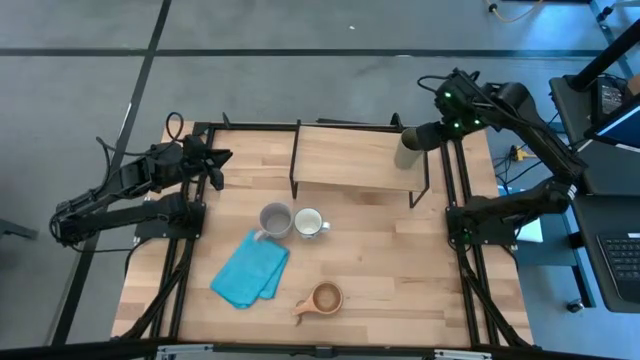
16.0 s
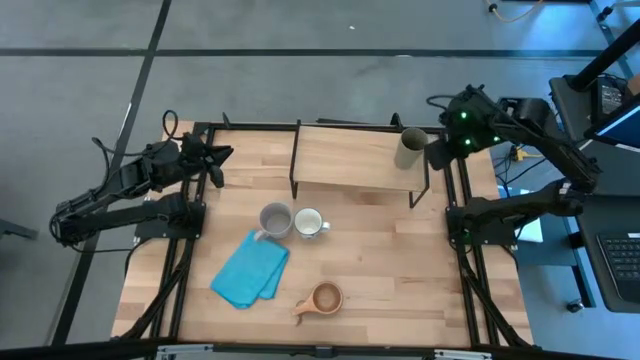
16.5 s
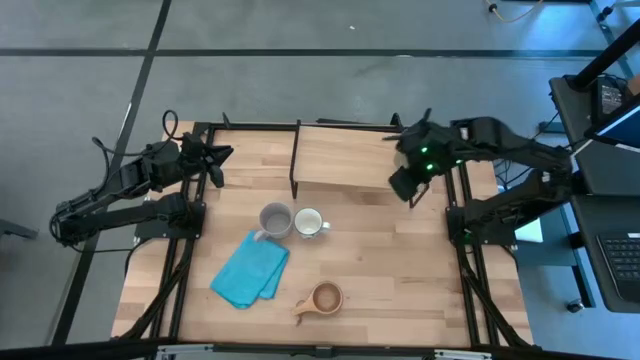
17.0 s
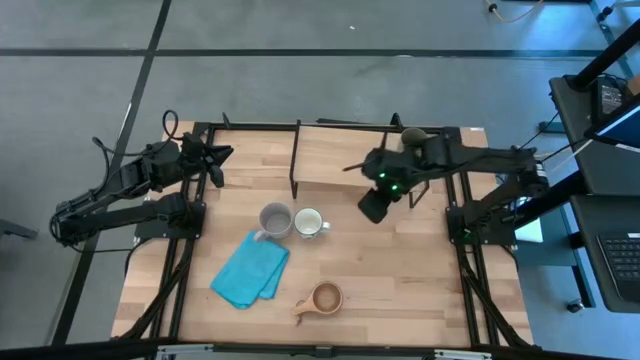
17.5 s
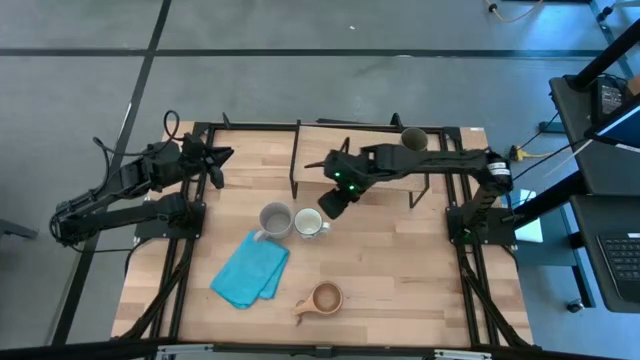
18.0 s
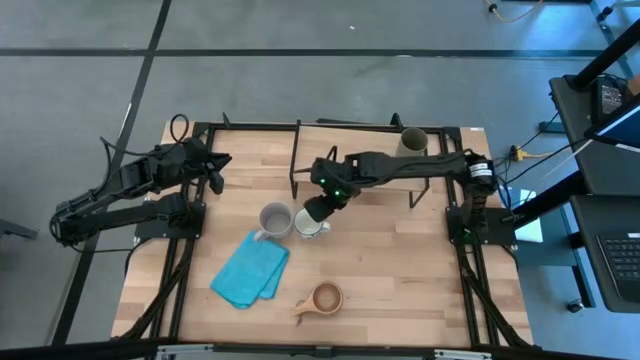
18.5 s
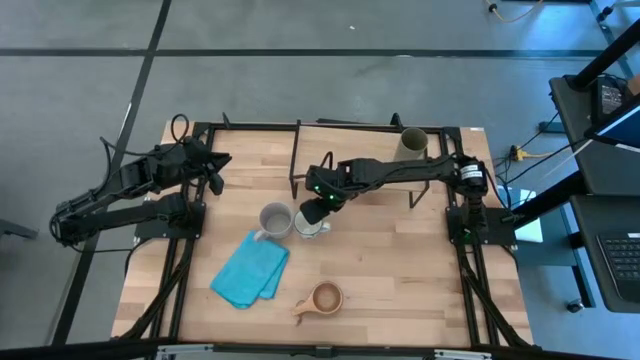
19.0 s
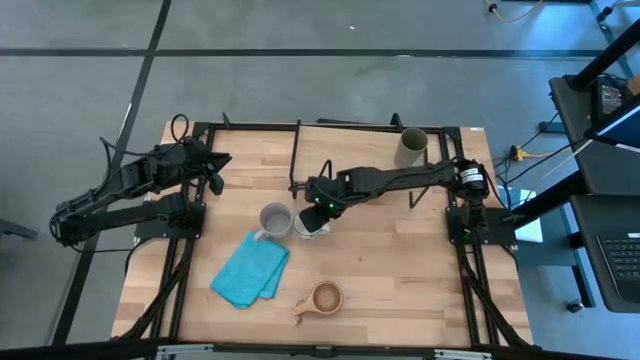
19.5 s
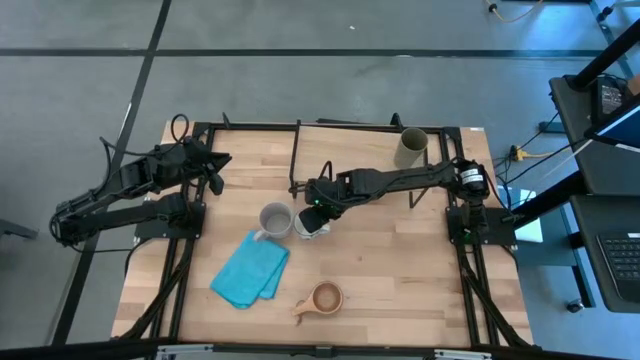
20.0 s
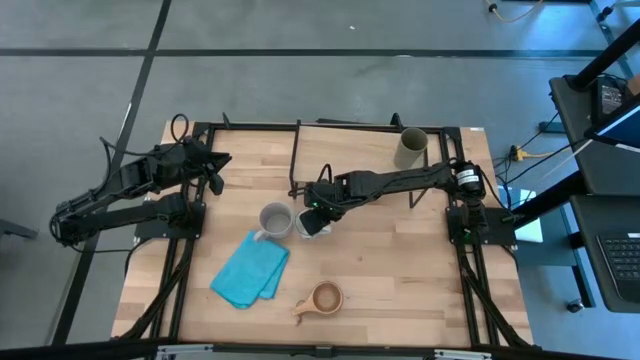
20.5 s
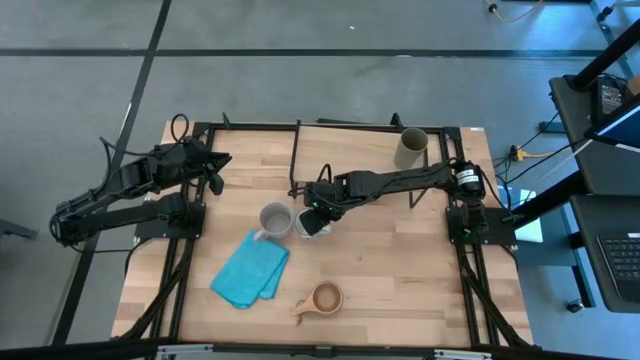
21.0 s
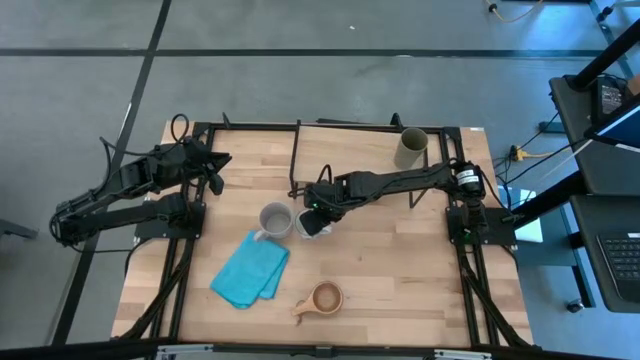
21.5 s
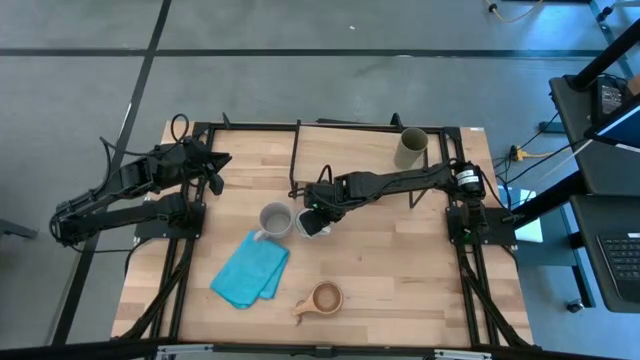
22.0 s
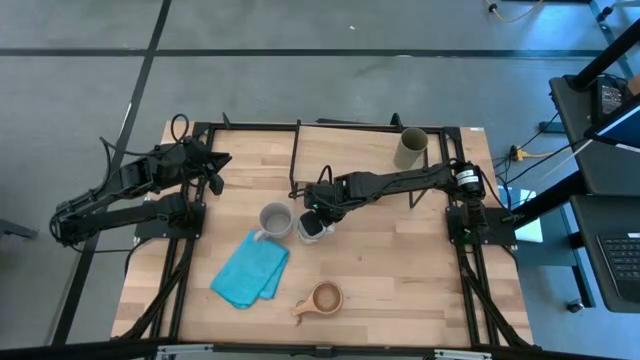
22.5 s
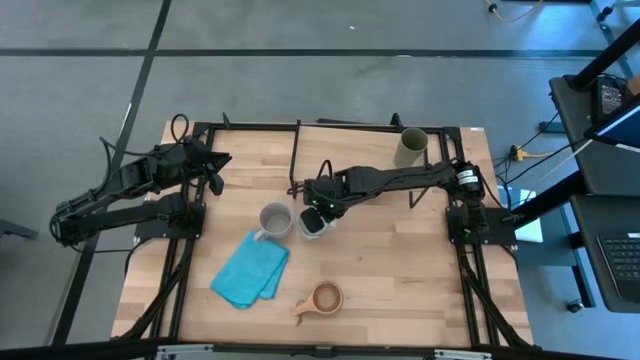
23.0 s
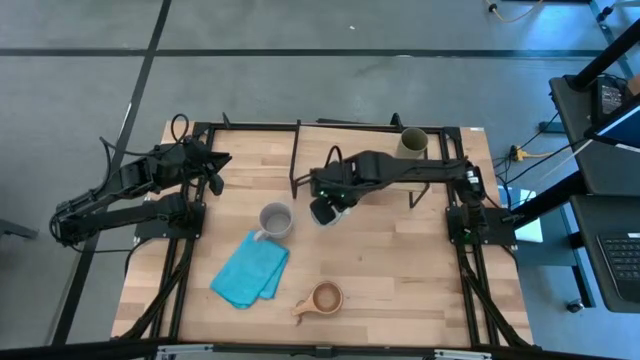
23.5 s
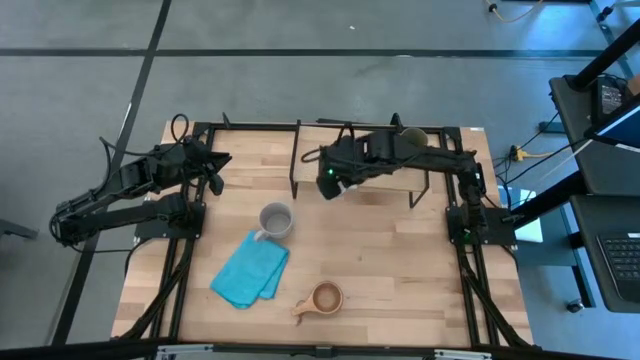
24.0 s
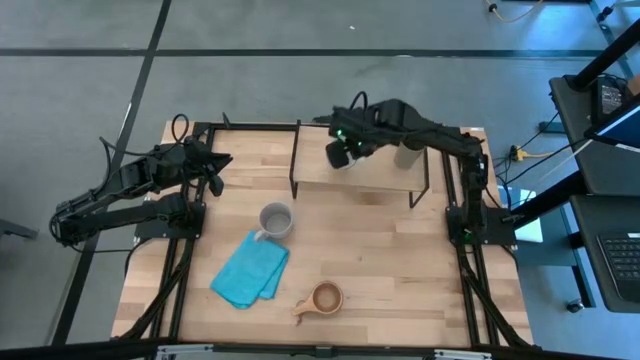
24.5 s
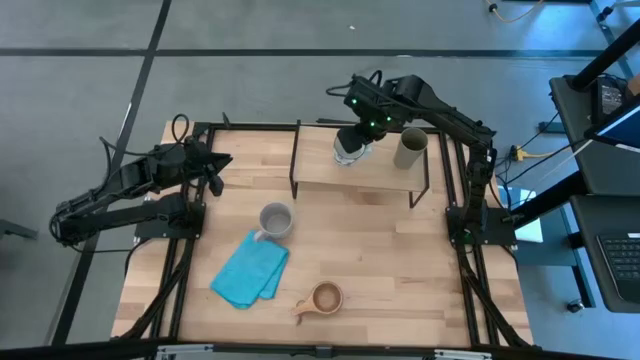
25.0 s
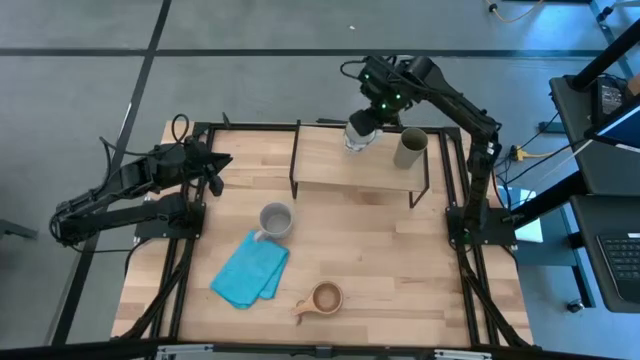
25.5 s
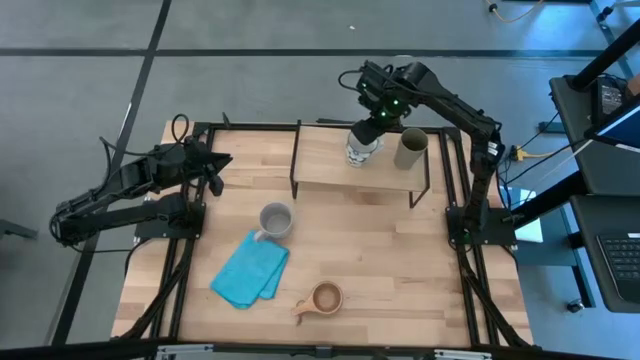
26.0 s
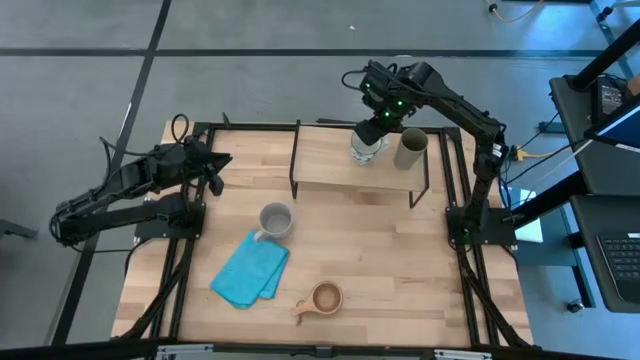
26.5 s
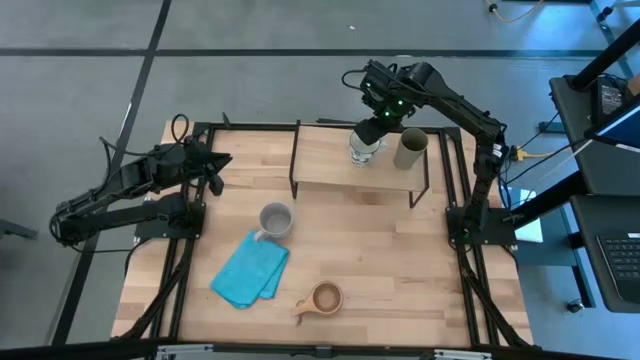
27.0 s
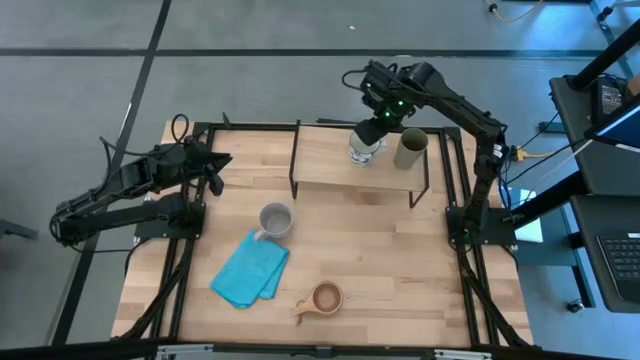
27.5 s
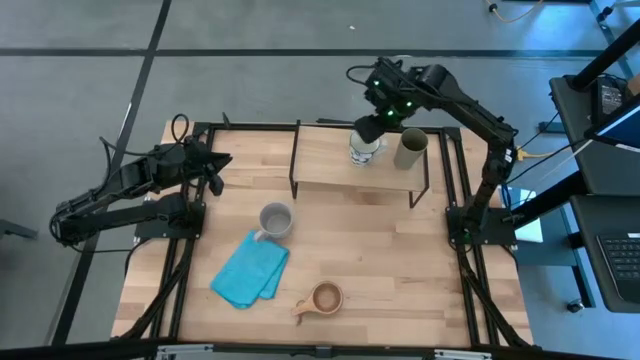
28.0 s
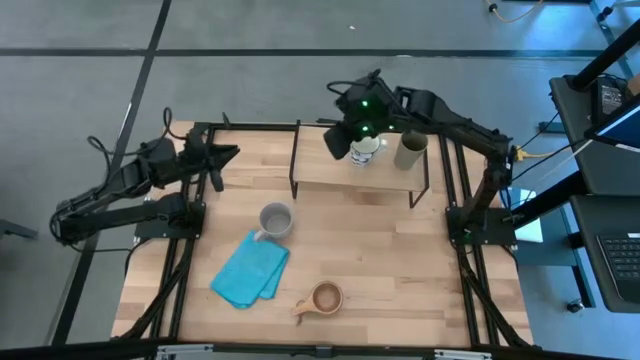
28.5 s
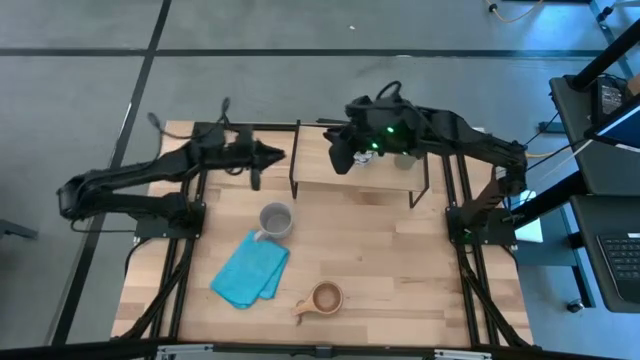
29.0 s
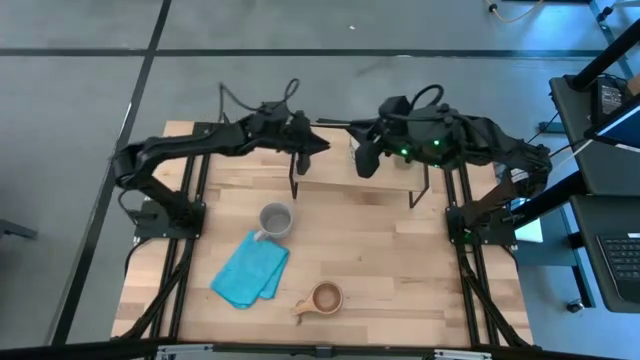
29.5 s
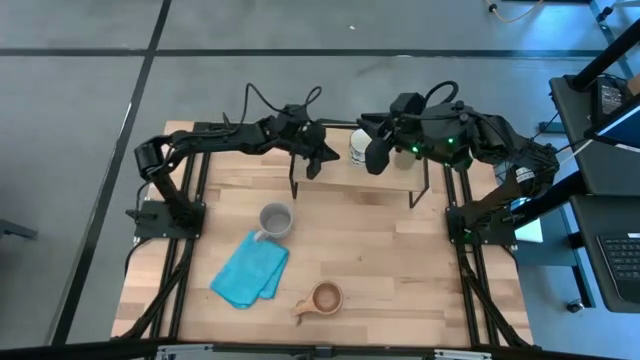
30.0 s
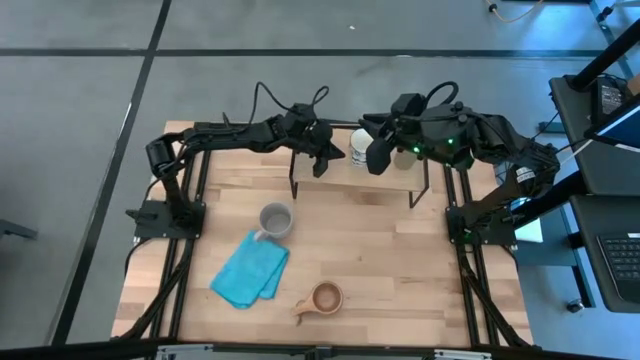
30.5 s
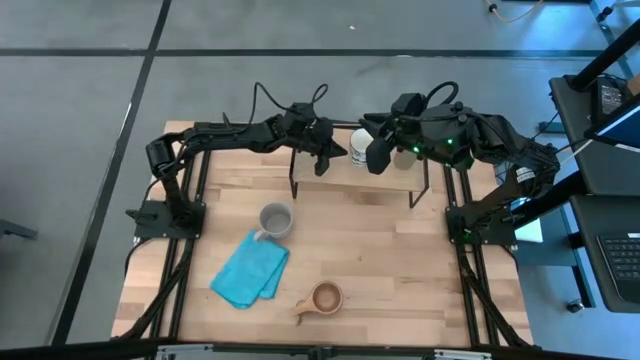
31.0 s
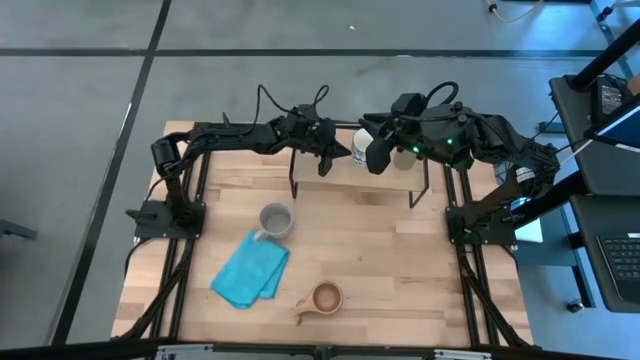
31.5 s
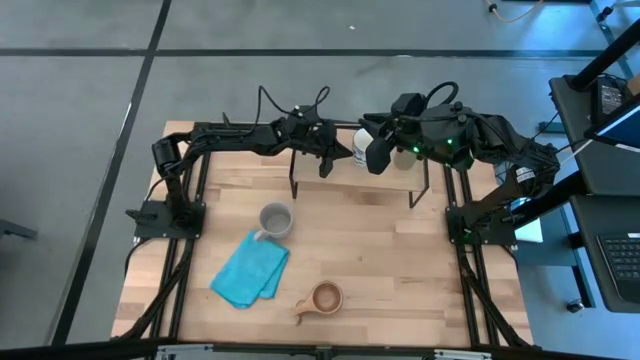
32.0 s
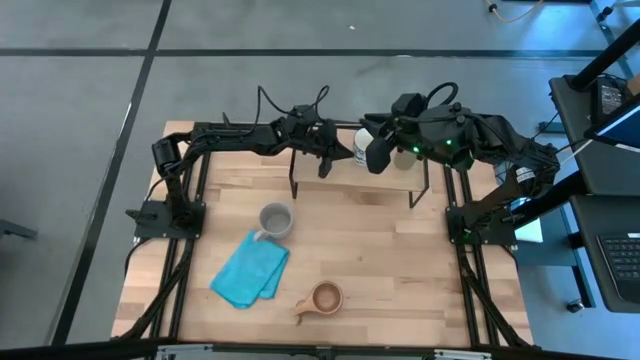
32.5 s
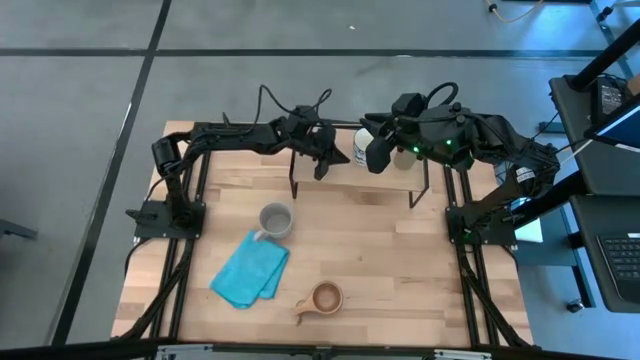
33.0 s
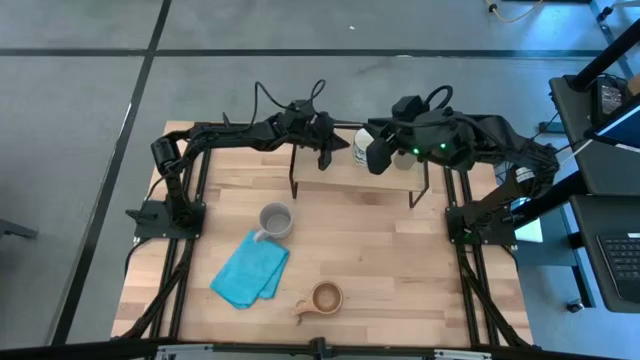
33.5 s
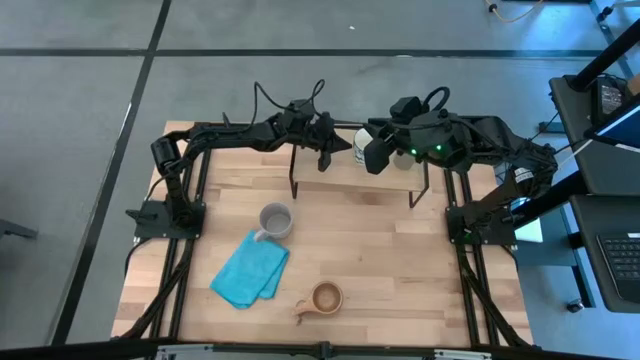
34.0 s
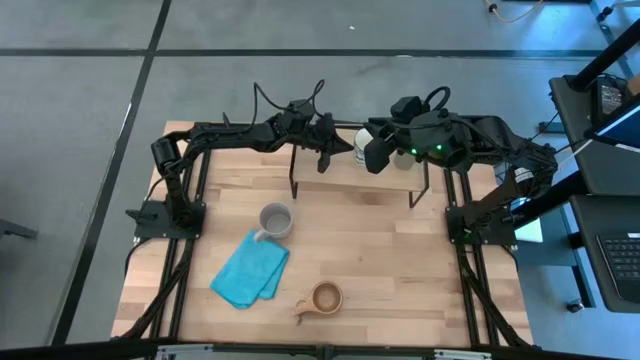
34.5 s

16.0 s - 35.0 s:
Task: Stack small to large cups/mugs on shelf
Put the blue mug on the shelf
